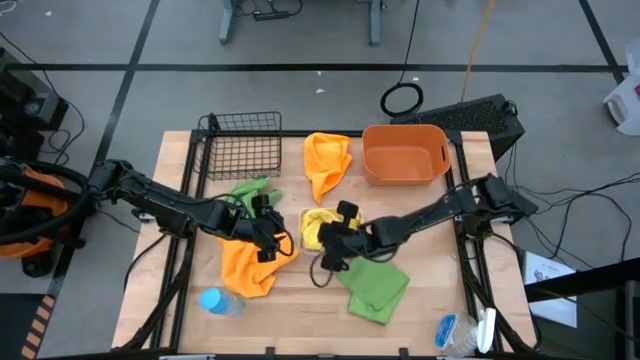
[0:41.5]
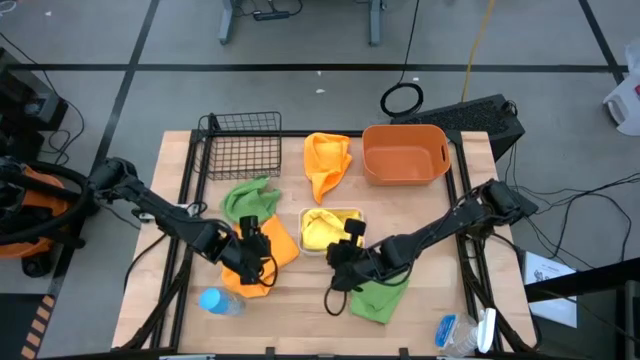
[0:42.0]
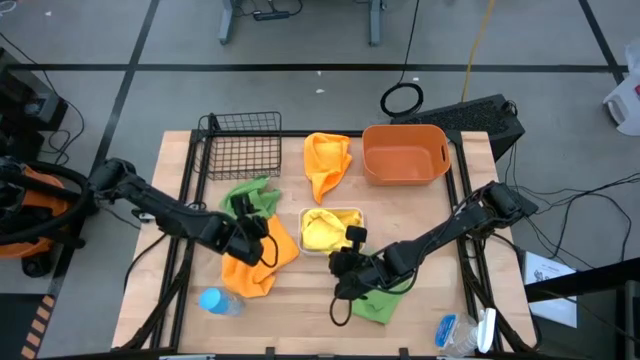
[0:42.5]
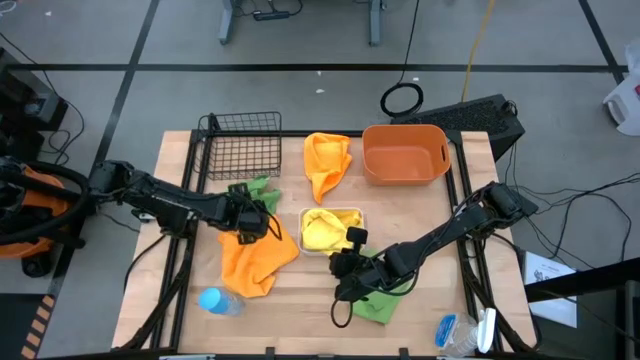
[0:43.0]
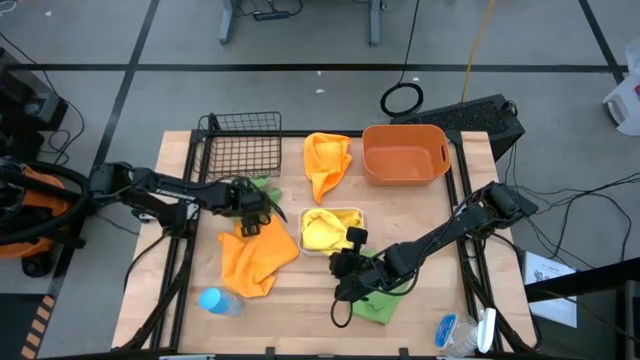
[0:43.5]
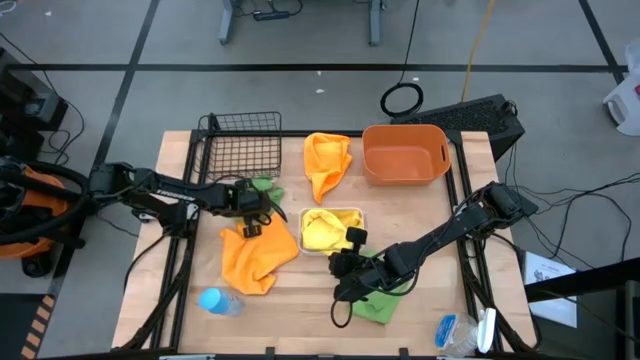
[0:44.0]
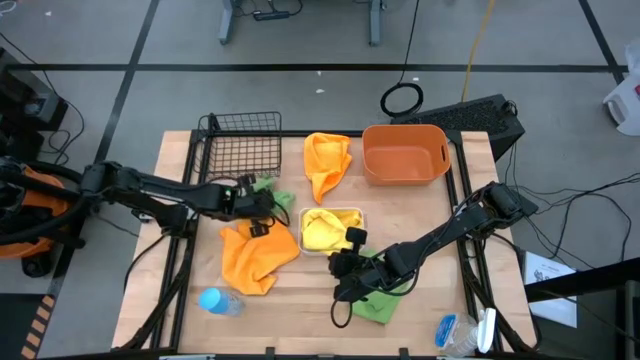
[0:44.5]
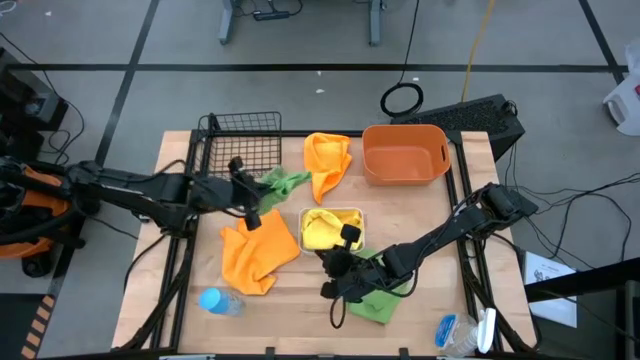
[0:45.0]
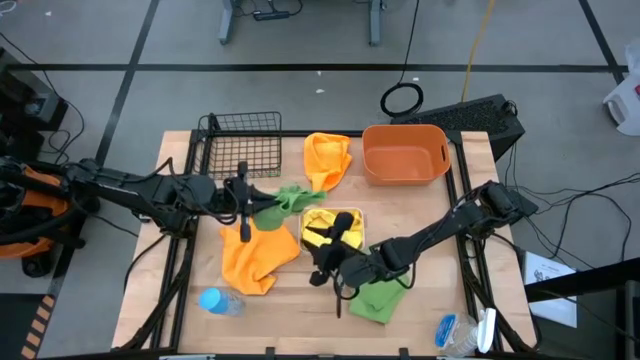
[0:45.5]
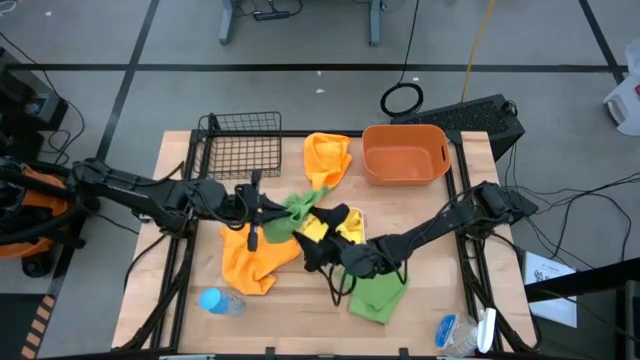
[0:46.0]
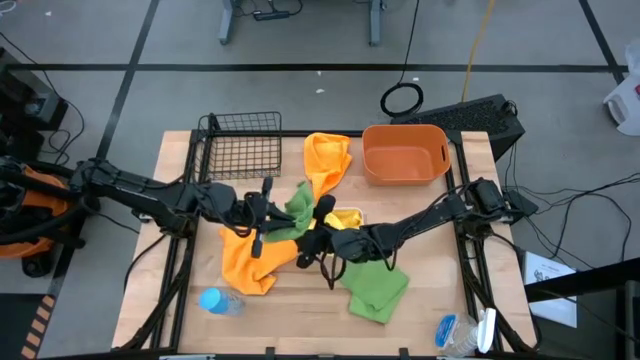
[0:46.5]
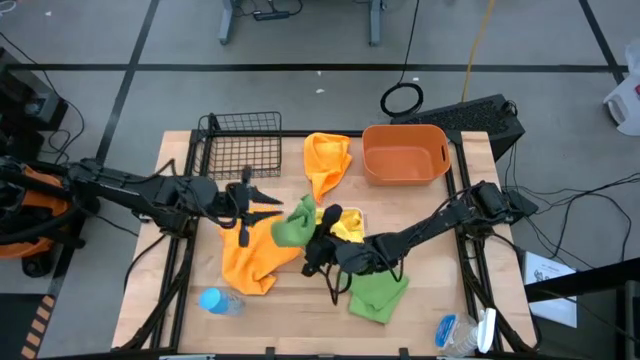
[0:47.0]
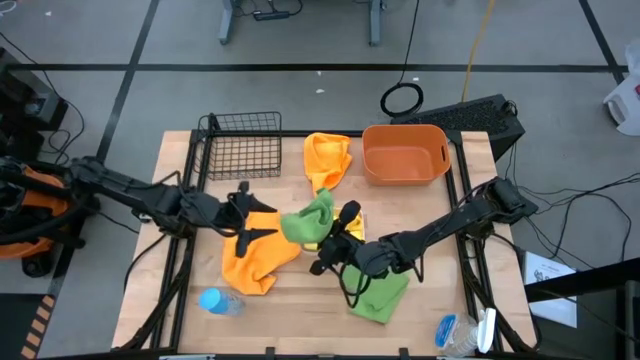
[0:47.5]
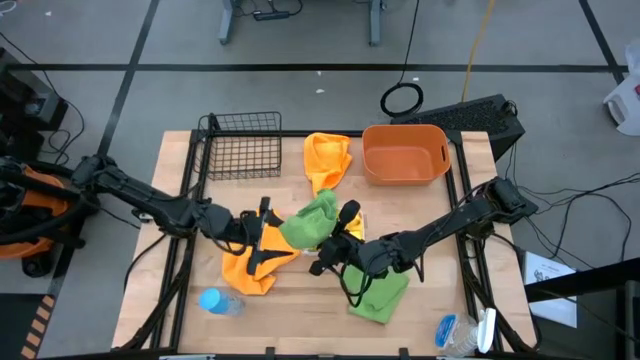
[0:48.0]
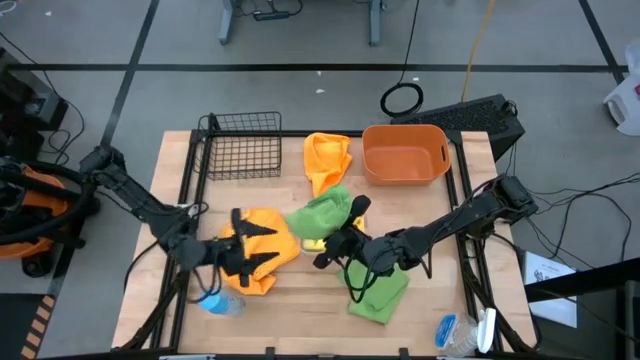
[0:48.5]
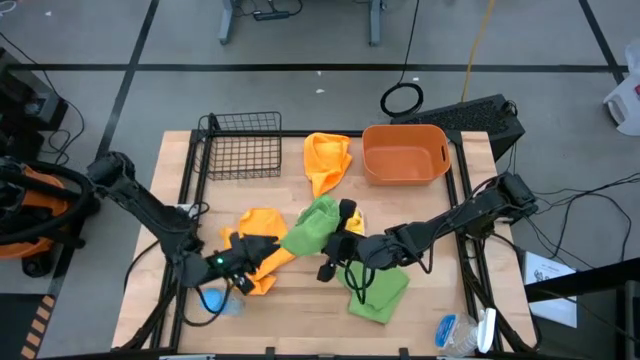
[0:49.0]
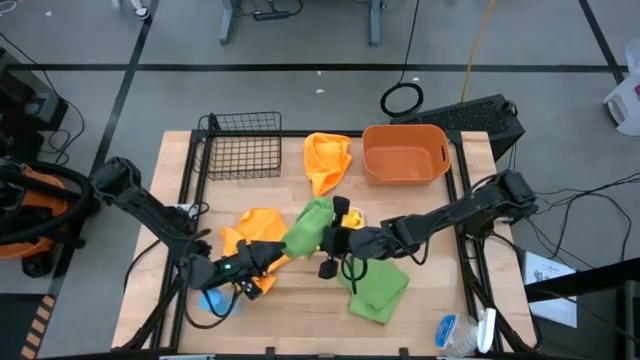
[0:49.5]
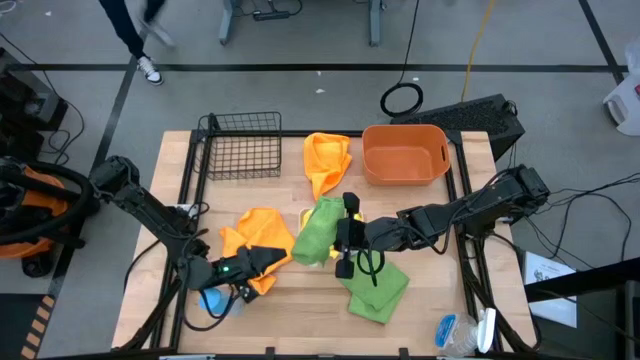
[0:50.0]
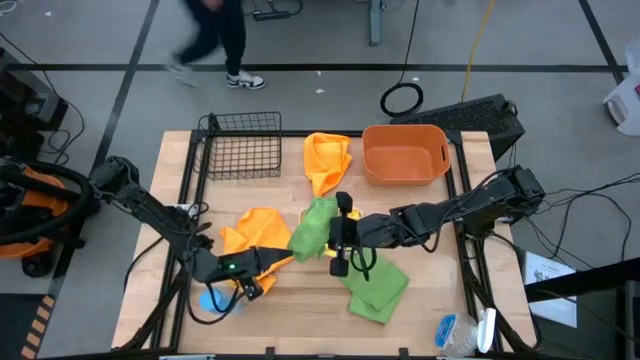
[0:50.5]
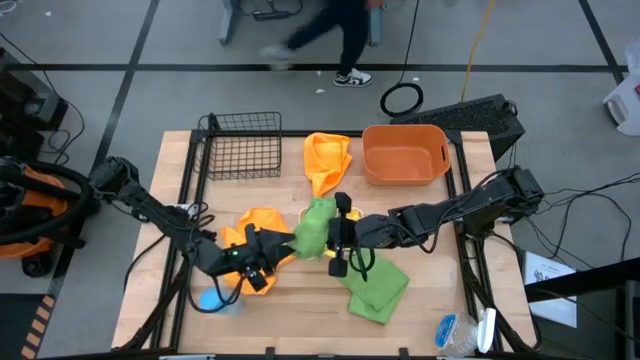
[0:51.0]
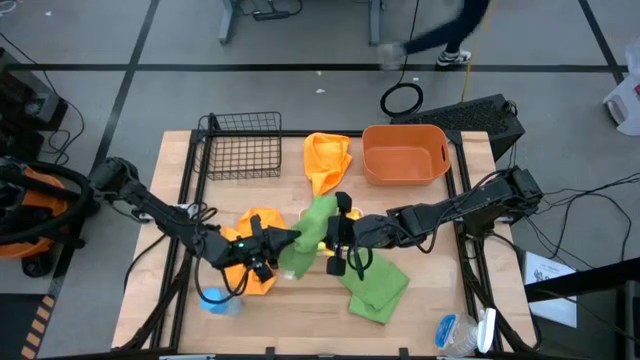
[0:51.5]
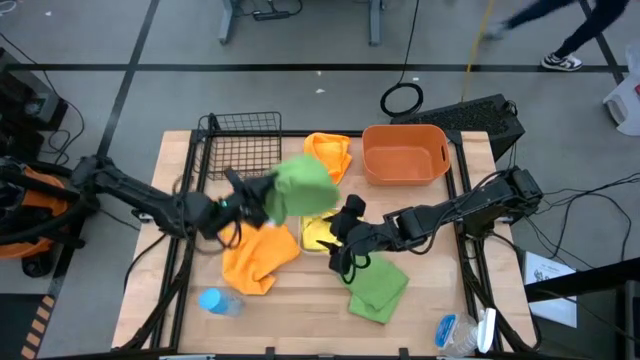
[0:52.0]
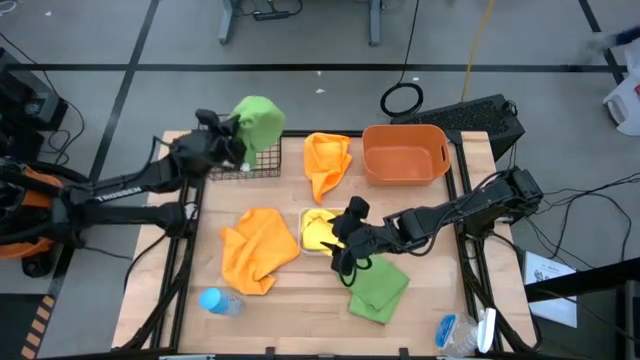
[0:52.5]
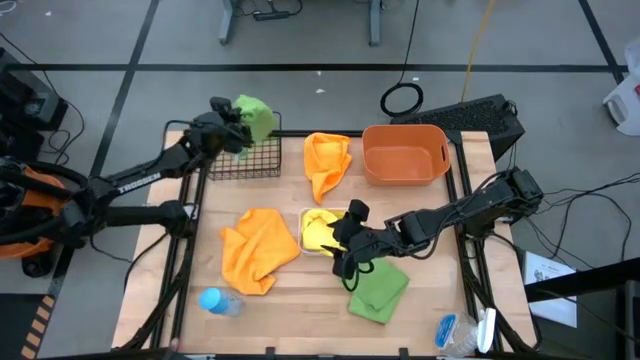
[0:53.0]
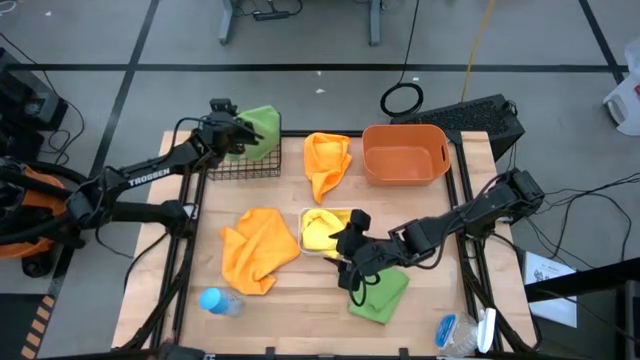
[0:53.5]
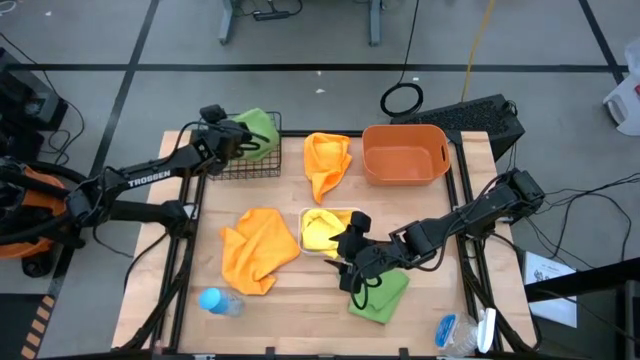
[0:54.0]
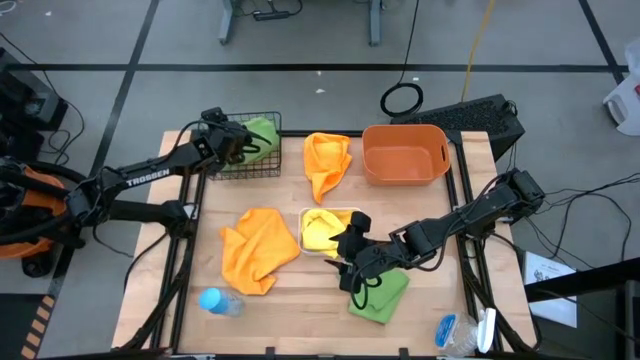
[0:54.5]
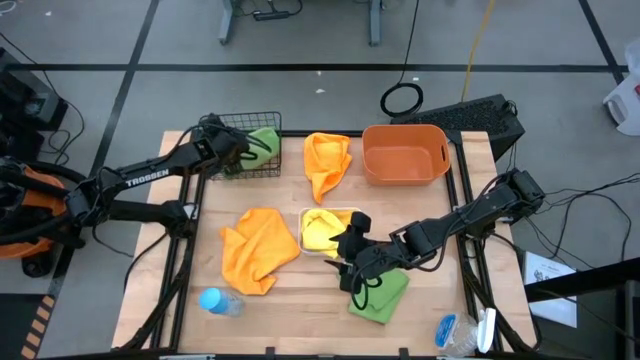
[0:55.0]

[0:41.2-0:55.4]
Task: Sort microfiber towel by color & place in baskets
Put the top green microfiber towel into the black wire basket

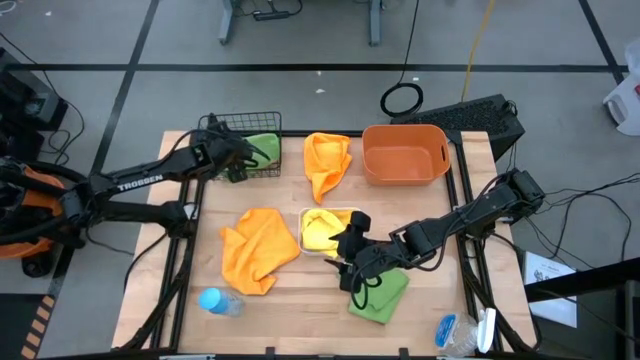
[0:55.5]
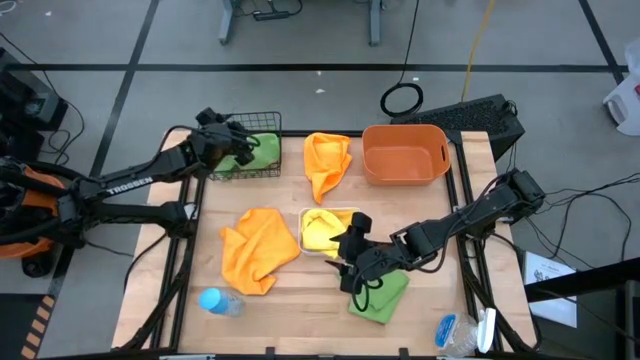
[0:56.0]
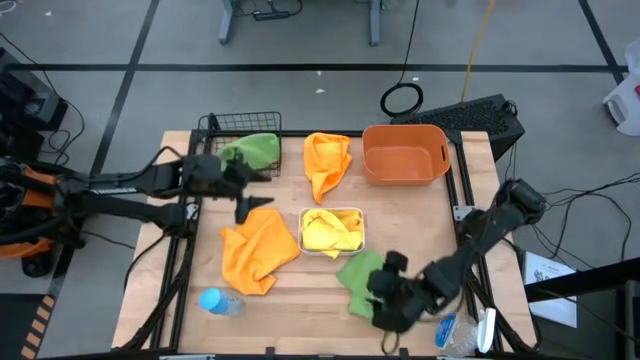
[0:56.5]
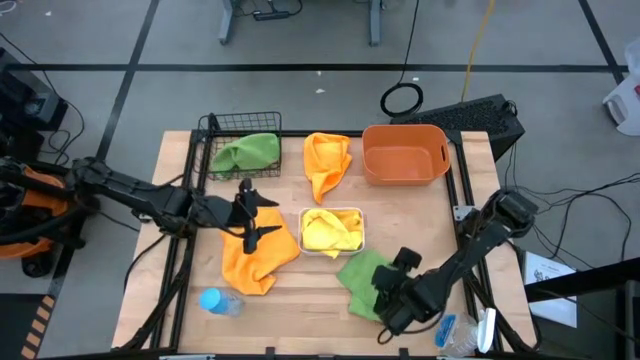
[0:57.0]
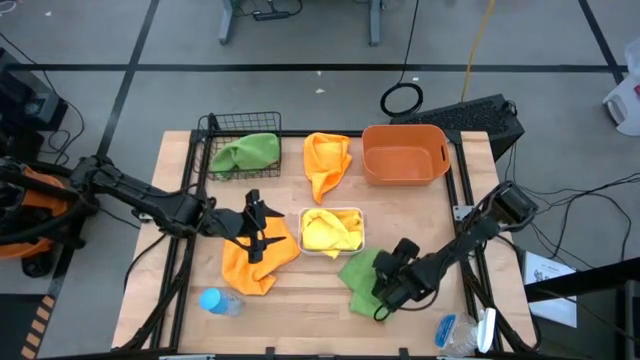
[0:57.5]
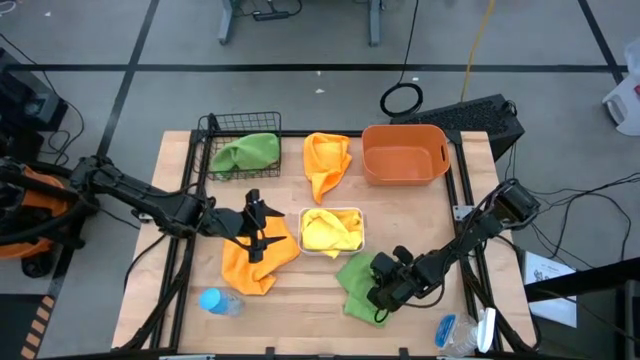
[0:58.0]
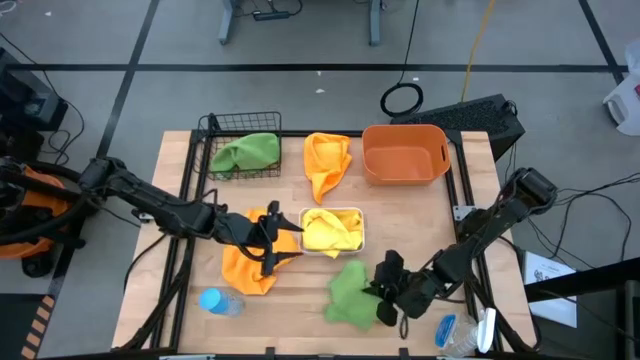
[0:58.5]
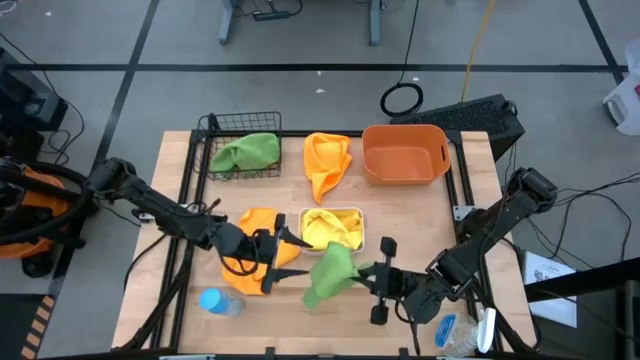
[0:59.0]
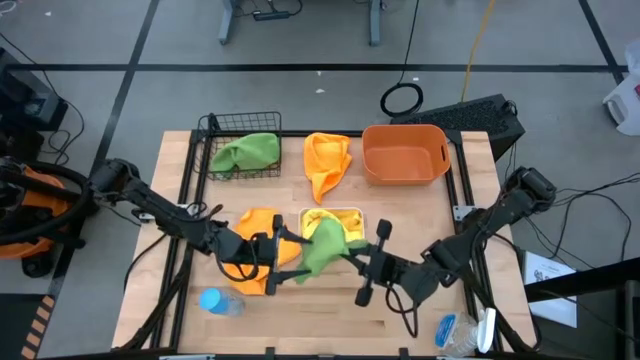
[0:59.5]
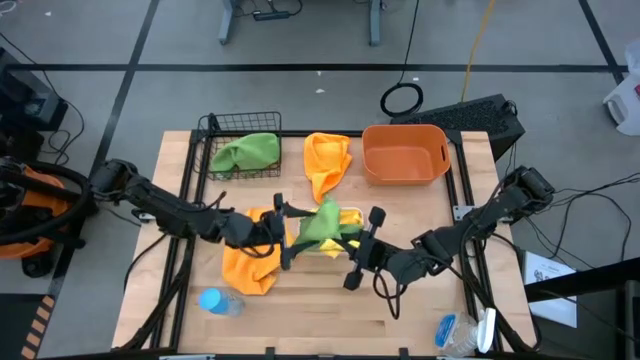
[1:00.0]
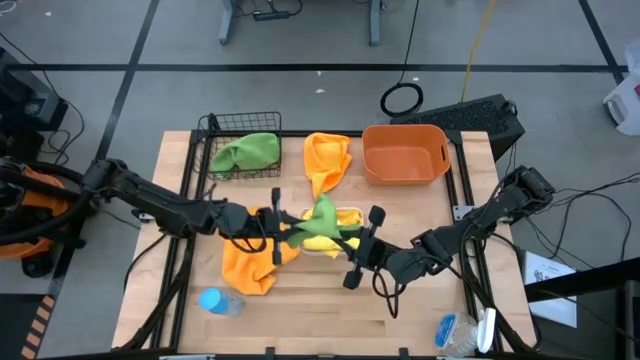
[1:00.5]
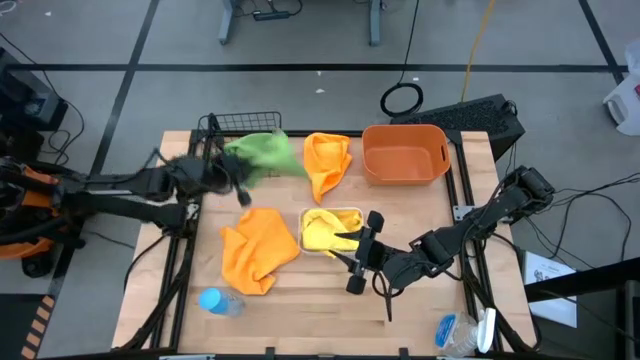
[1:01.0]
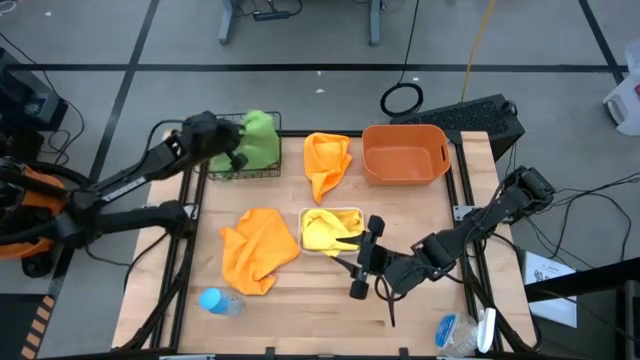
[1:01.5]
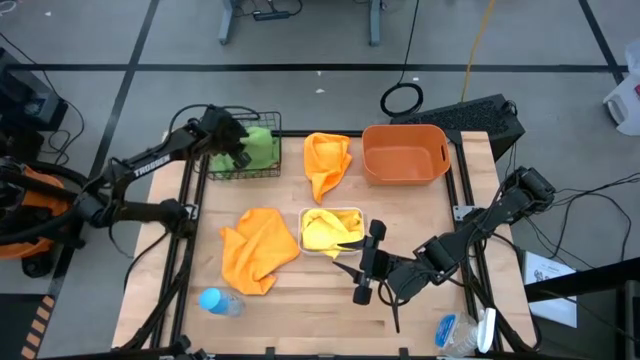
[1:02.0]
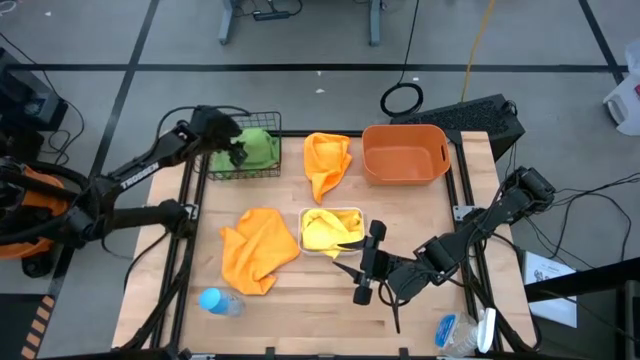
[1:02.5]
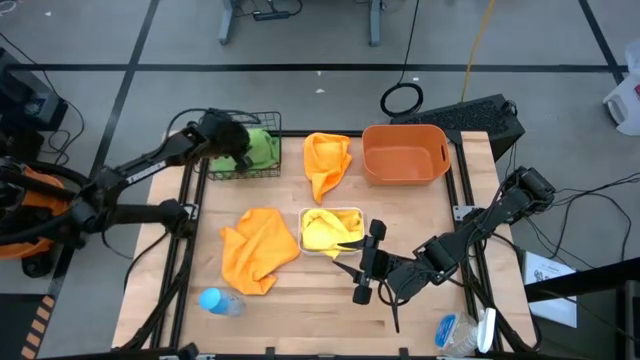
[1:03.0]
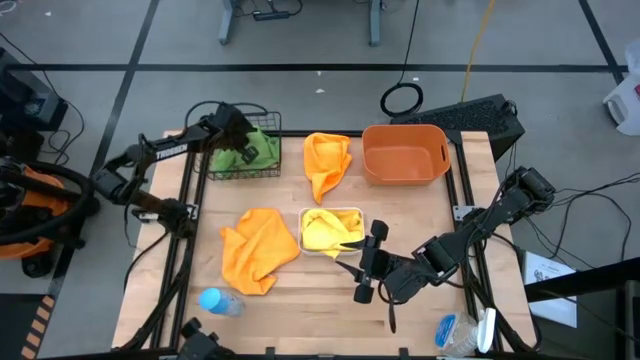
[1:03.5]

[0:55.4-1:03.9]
Put the green microfiber towel into the black wire basket
